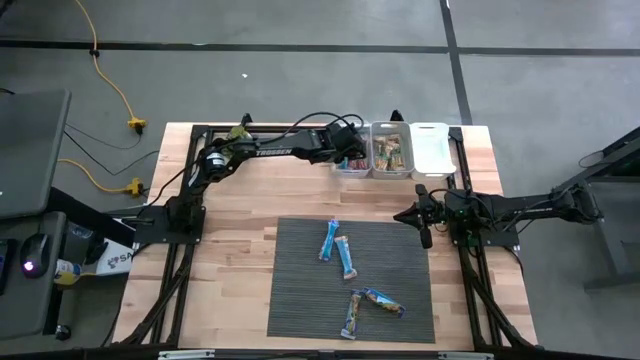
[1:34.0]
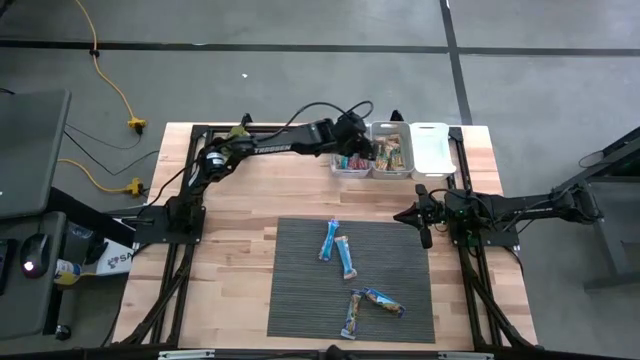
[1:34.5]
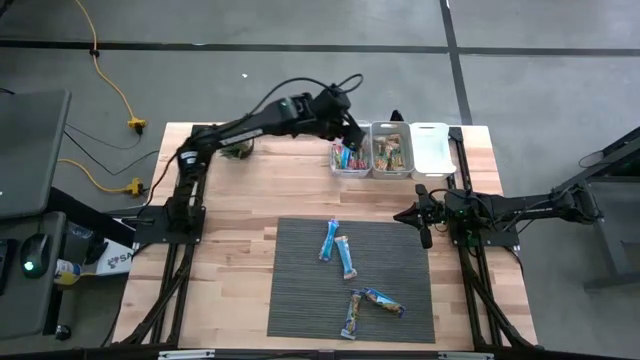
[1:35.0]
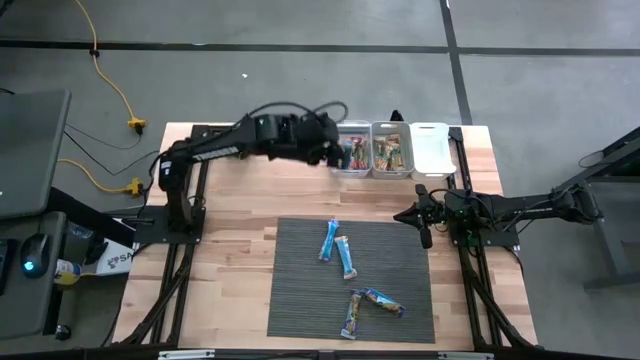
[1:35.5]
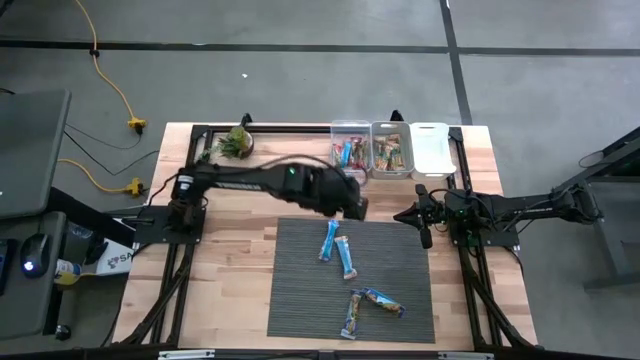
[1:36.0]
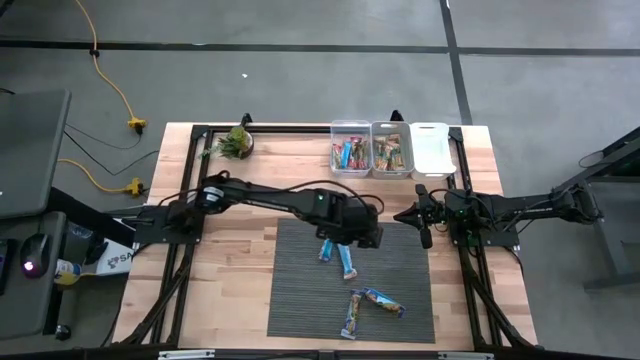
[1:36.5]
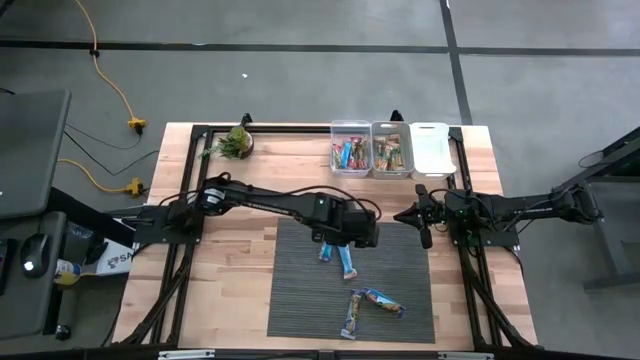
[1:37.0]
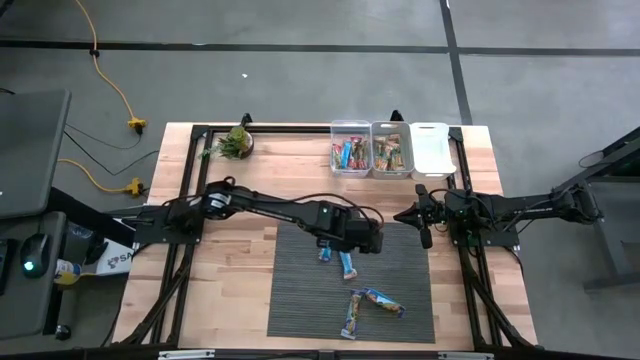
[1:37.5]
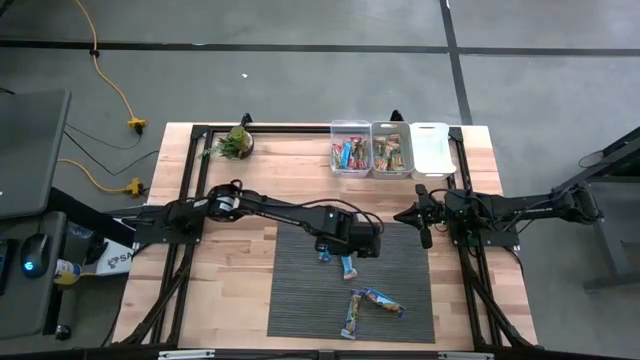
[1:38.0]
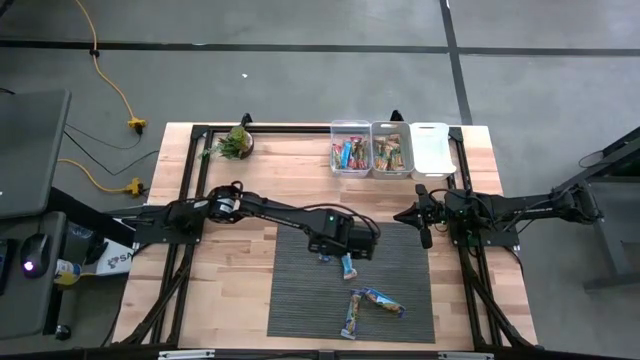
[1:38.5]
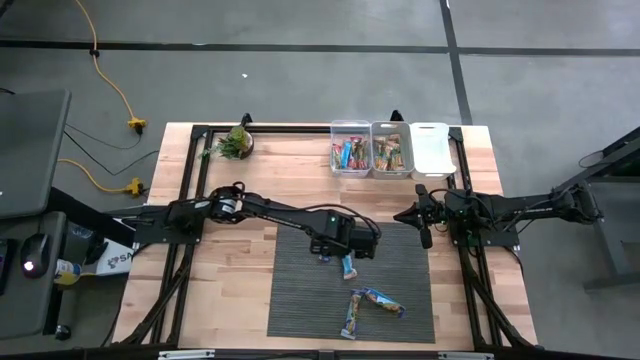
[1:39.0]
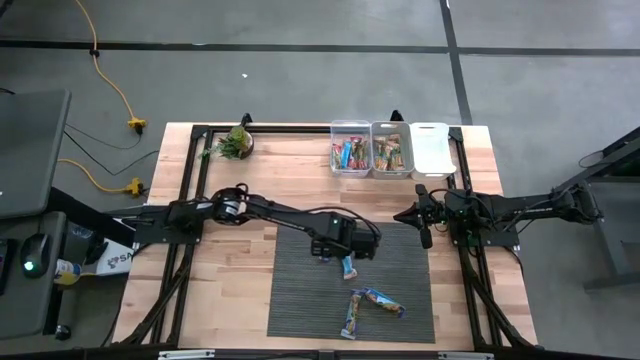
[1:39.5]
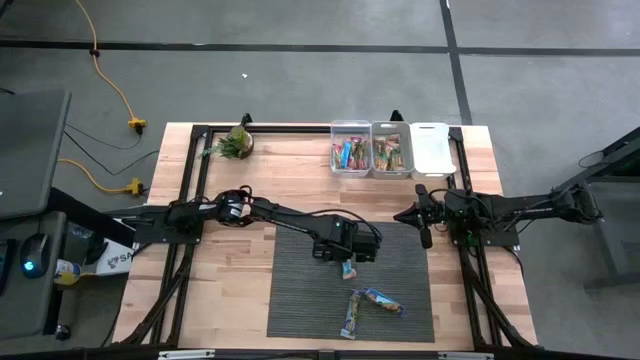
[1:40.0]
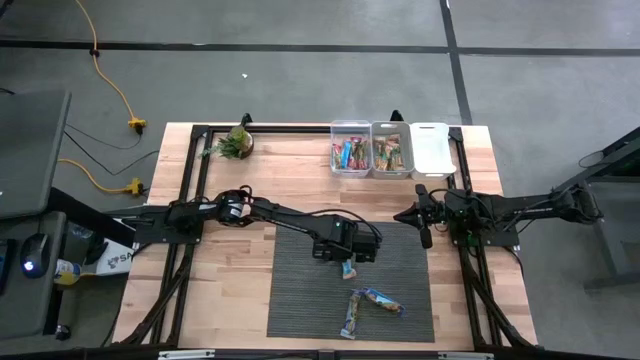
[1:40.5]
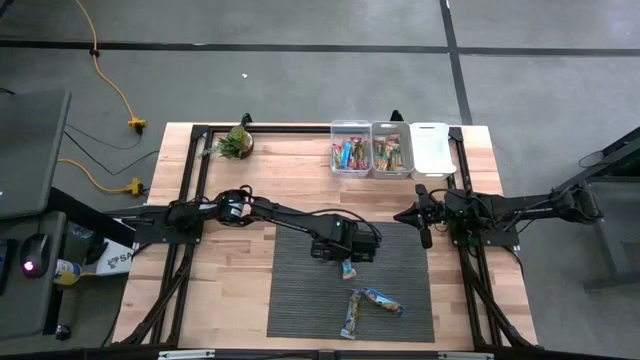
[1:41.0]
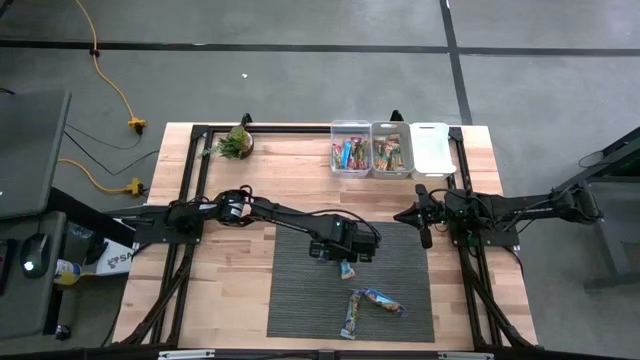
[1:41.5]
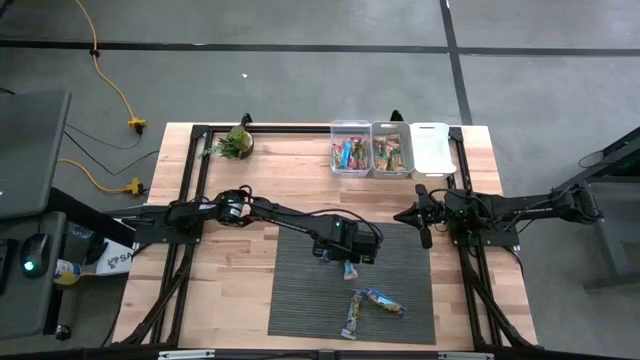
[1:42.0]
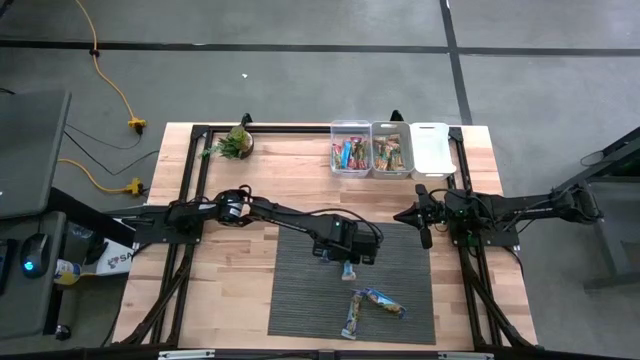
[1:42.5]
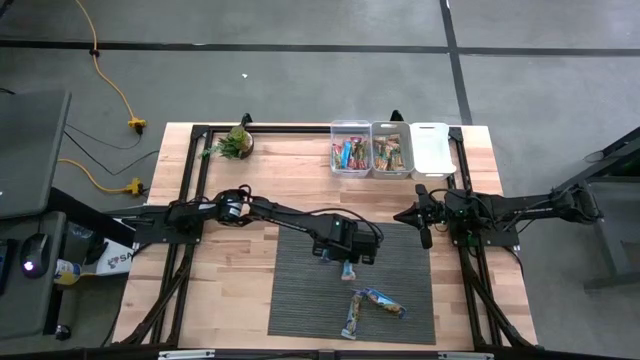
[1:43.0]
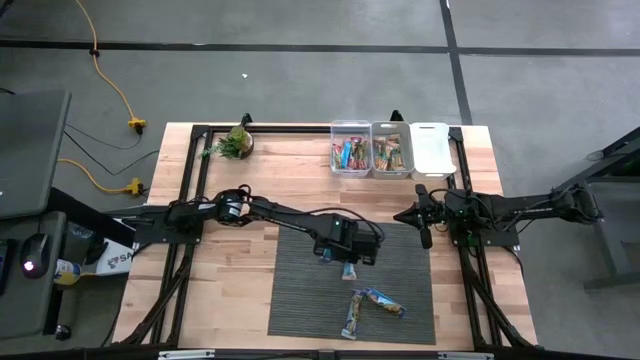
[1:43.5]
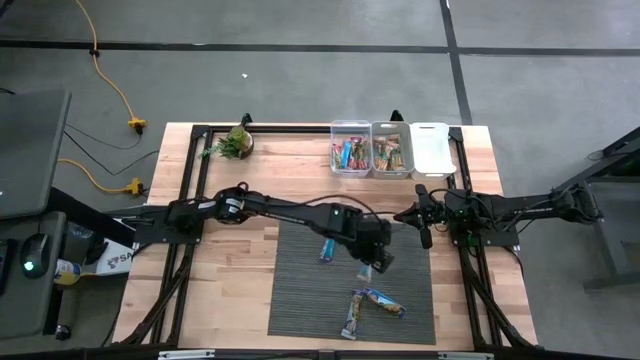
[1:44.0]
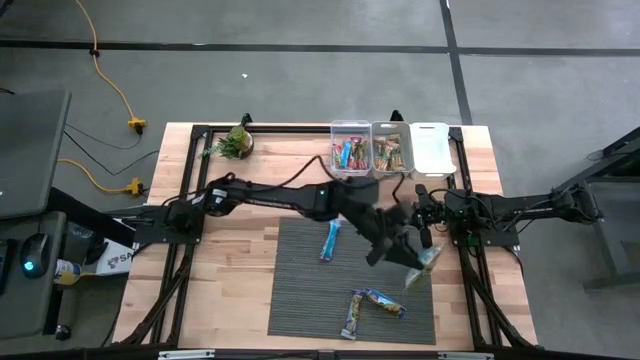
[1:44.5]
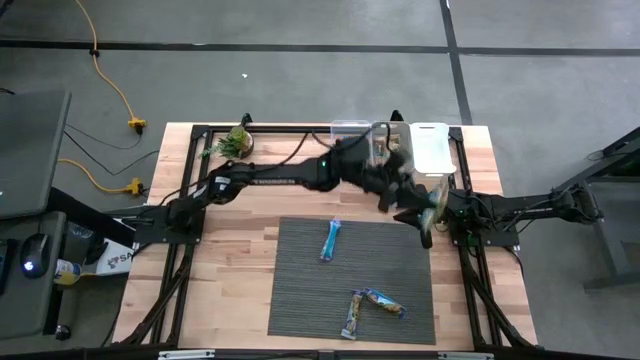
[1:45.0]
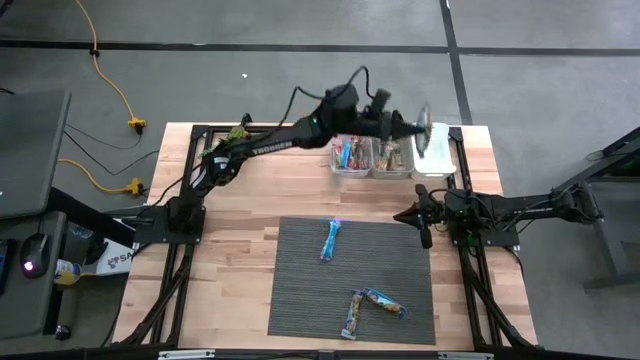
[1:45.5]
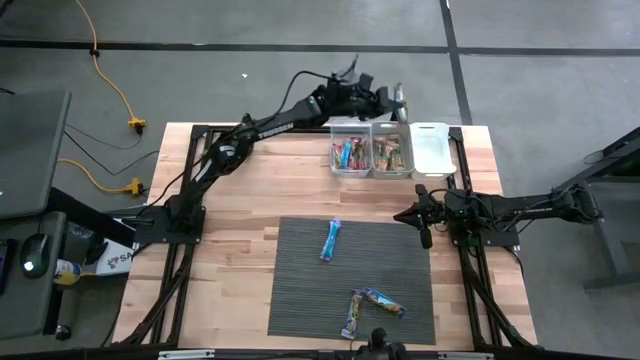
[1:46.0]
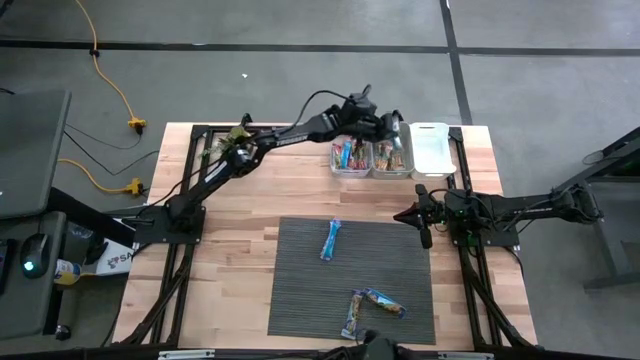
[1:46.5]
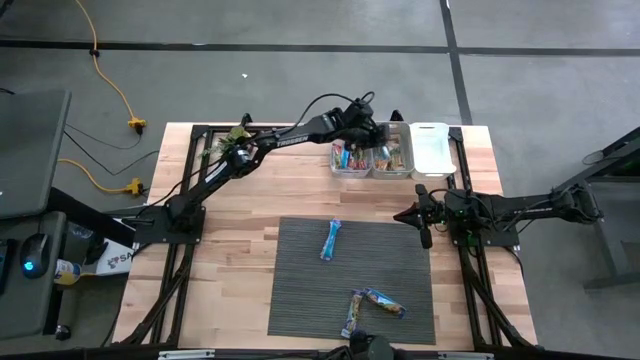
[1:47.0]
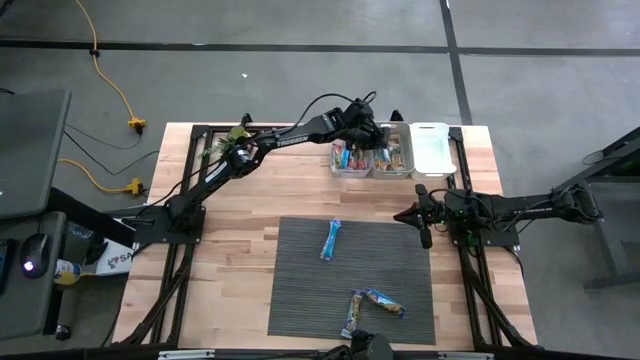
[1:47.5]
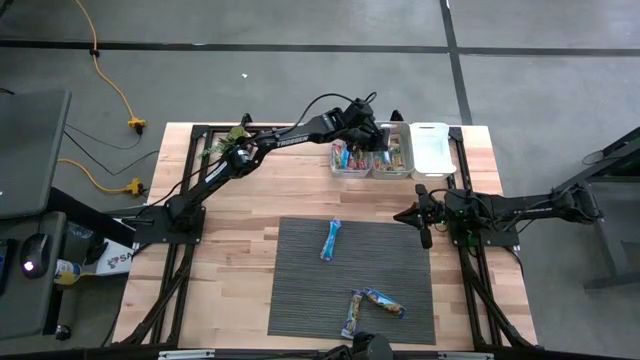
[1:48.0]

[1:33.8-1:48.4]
Task: Pick and place Granola Bars by type
Put the orange granola bar into the gray bin

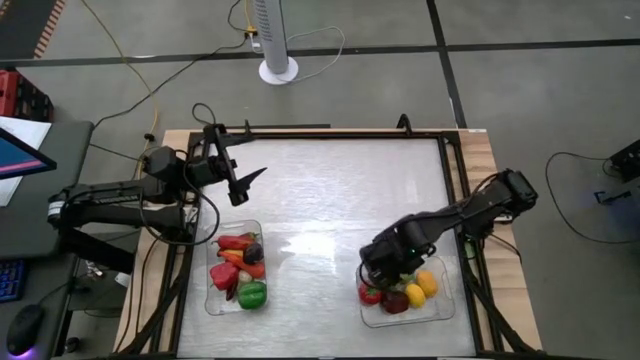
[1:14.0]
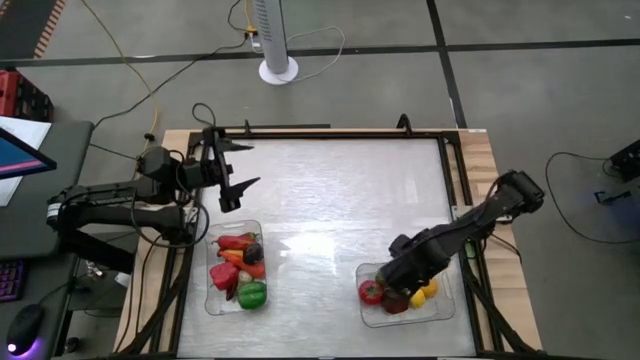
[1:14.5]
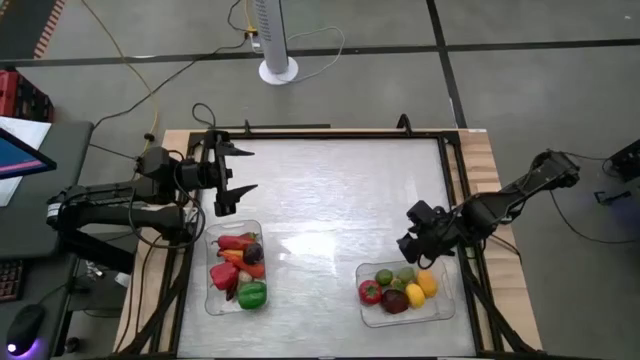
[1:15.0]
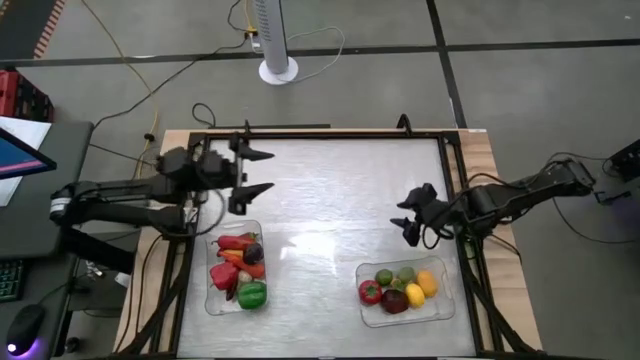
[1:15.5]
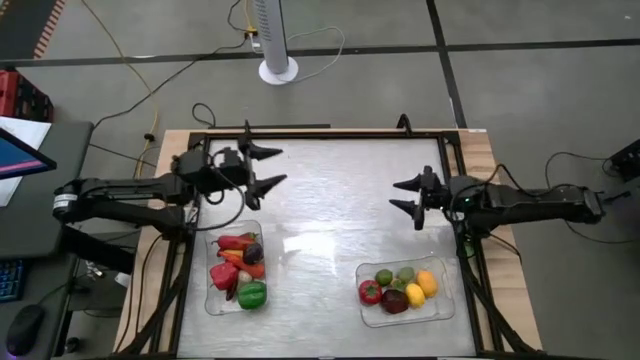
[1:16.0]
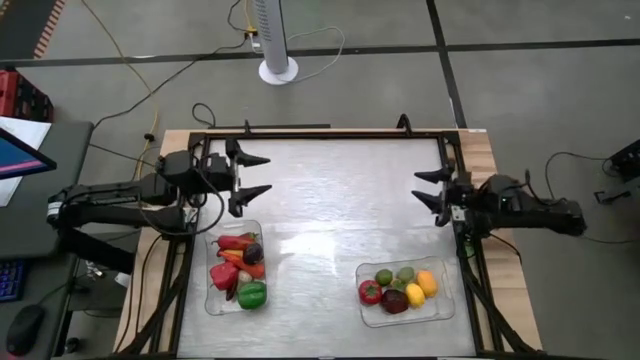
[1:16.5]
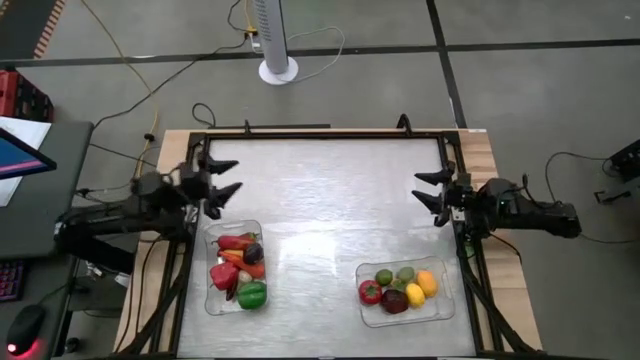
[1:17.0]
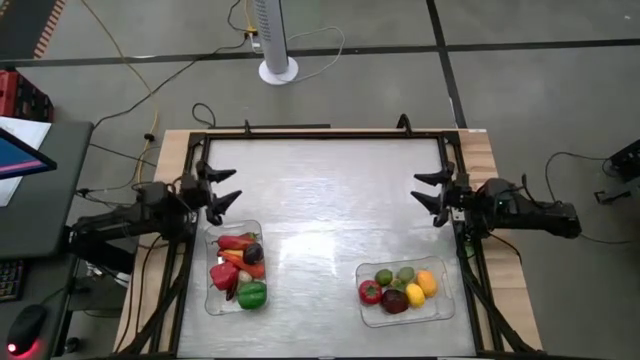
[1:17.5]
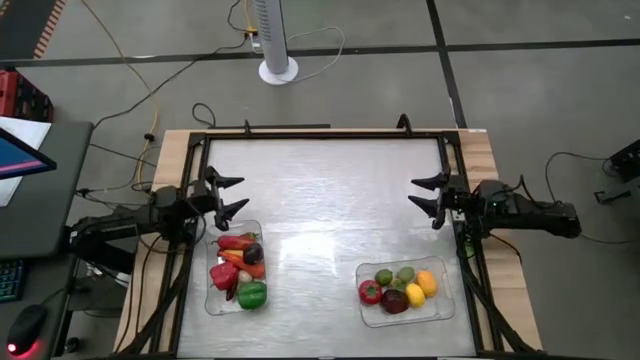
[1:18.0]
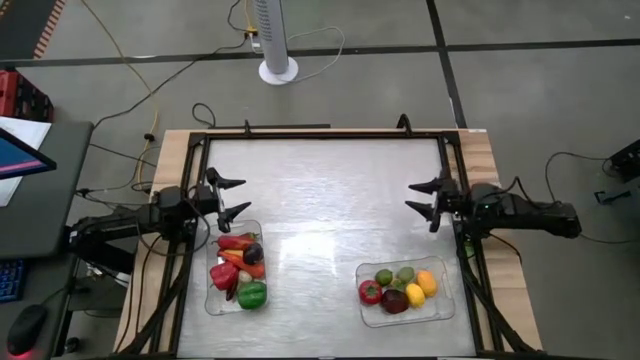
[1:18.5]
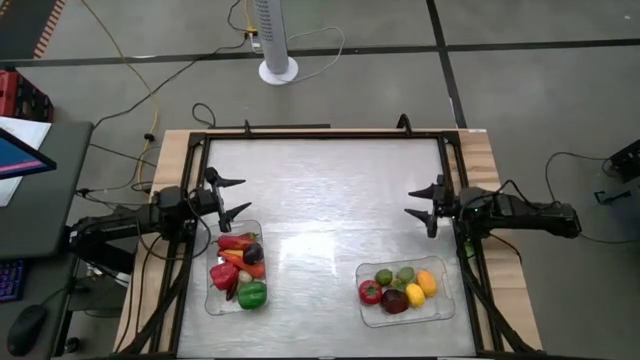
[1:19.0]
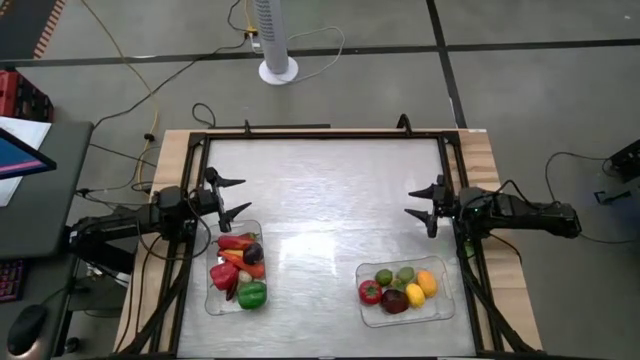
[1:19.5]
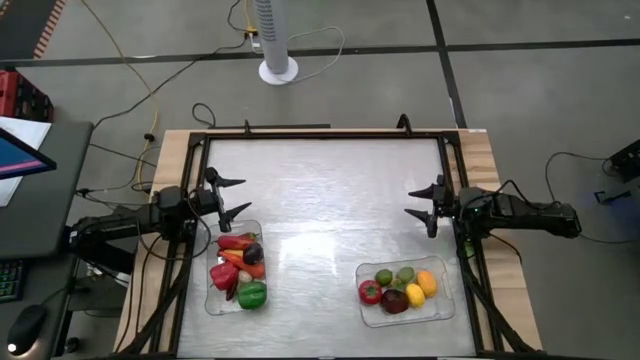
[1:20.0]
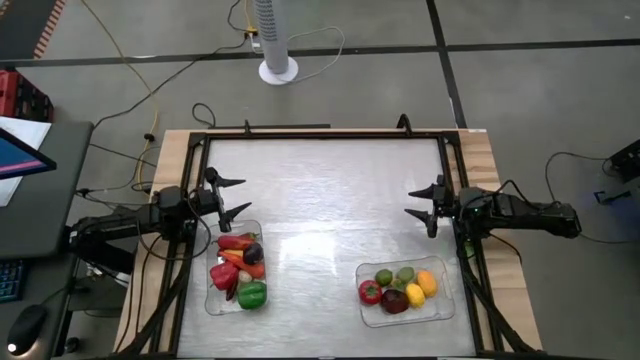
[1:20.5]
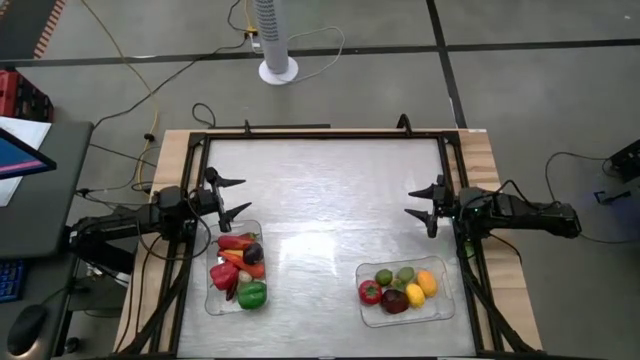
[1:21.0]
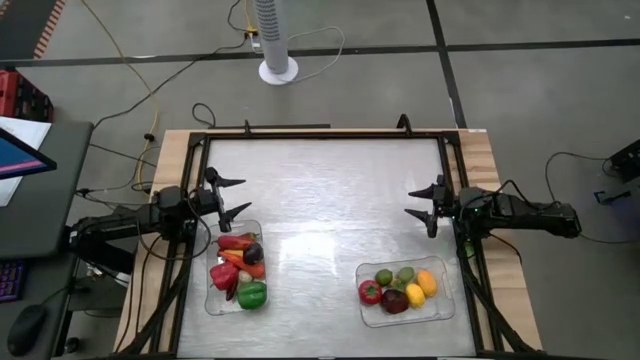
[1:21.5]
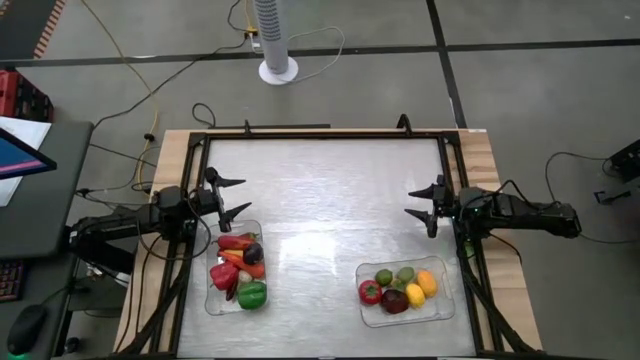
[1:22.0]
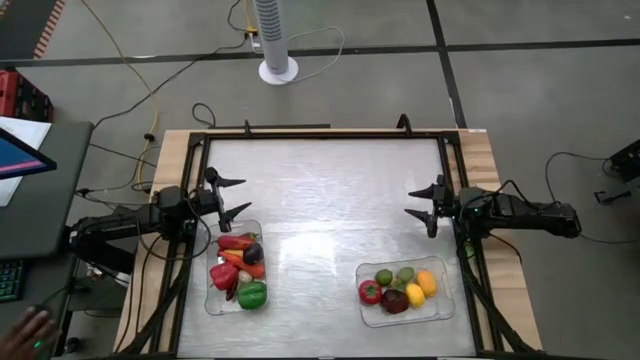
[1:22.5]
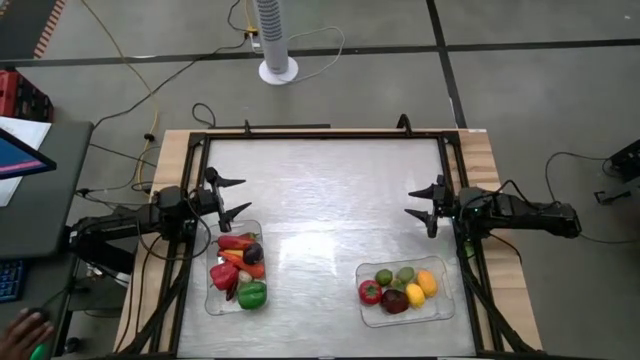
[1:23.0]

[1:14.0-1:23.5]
Task: Sort produce into baskets
Return to Home Position
